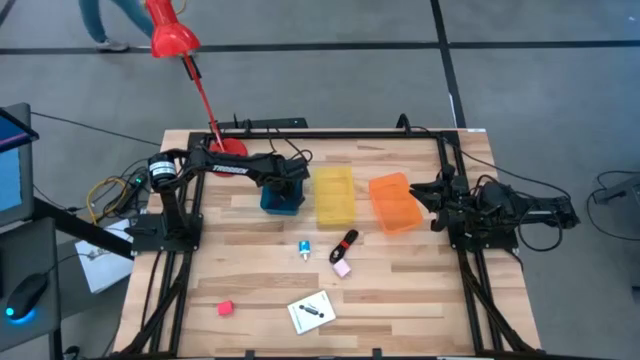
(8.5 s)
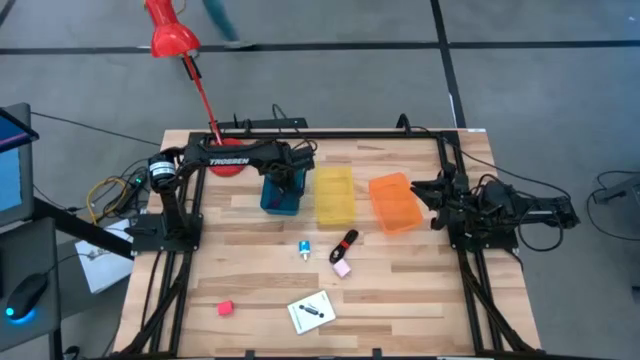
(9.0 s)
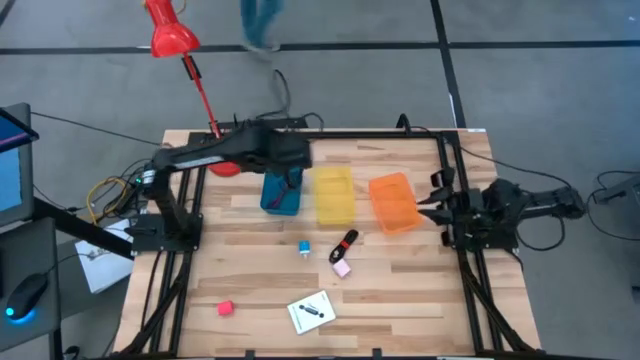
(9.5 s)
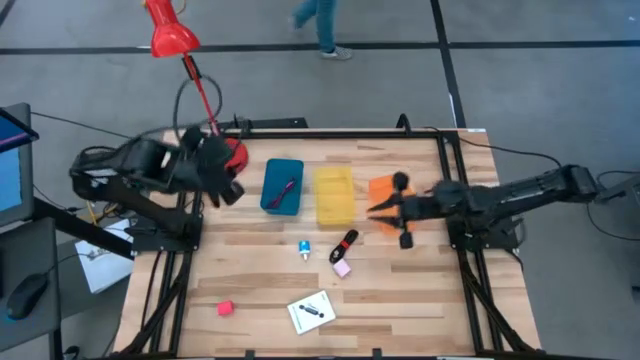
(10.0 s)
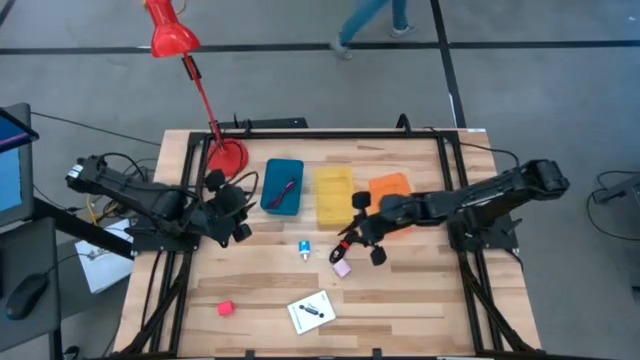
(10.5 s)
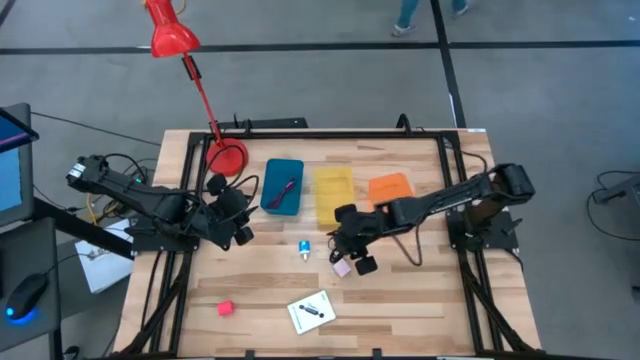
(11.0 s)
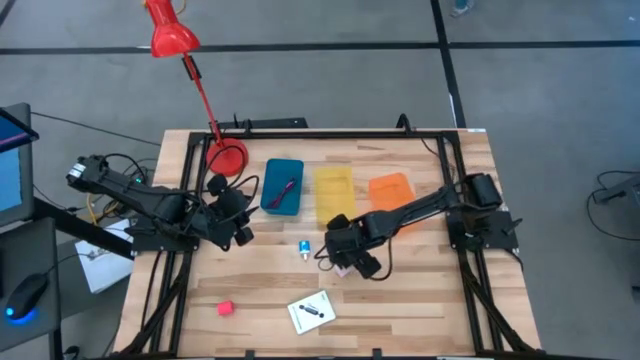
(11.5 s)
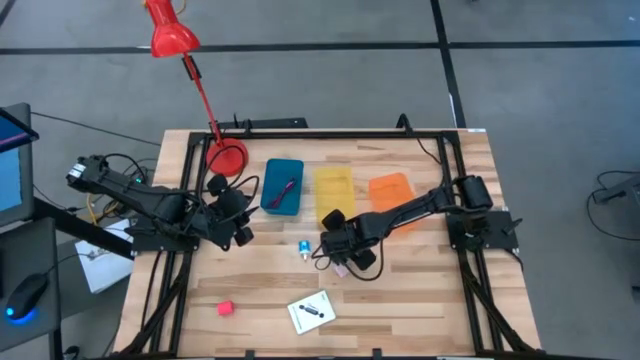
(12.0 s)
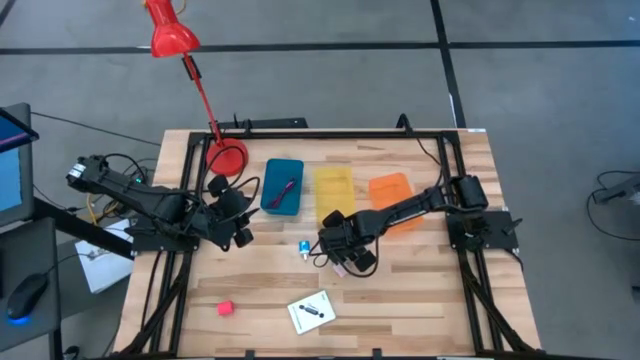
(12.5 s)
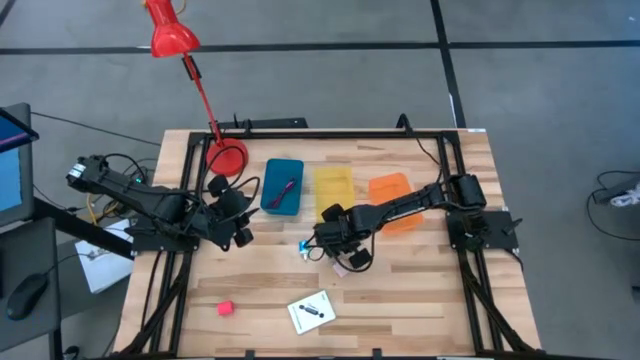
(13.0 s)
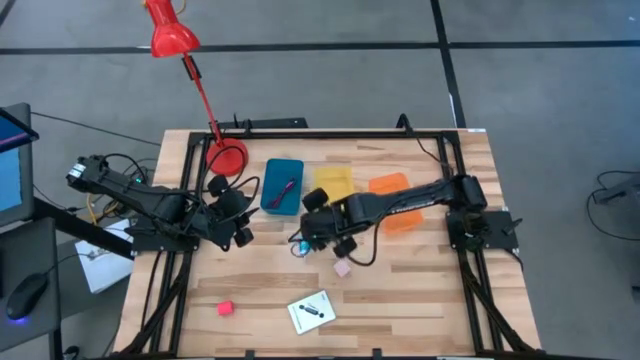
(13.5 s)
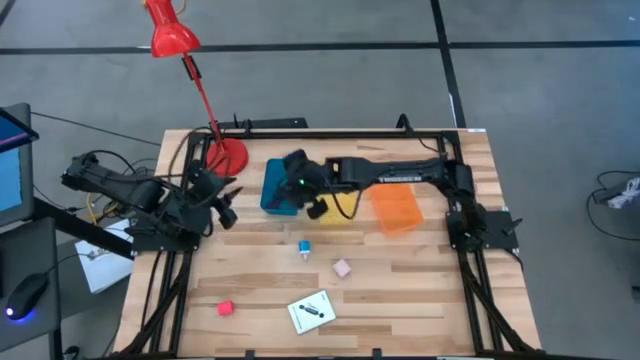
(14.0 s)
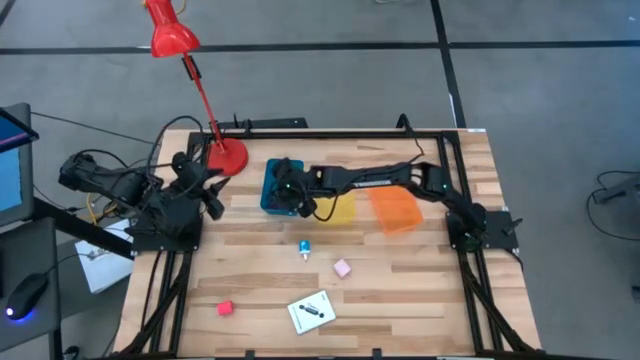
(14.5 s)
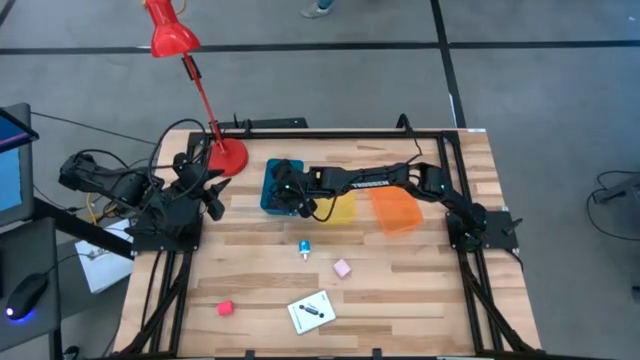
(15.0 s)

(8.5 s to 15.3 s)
Task: Pick and place items into bin
Put the black charger cable into the blue bin

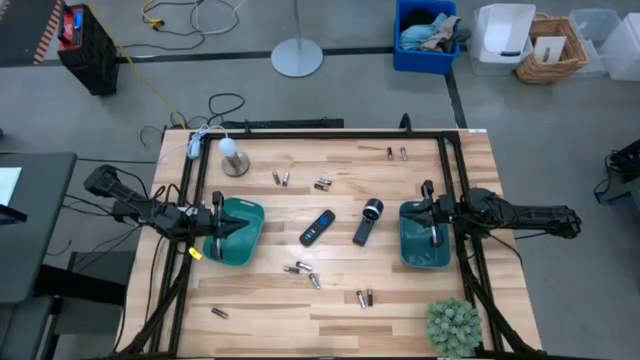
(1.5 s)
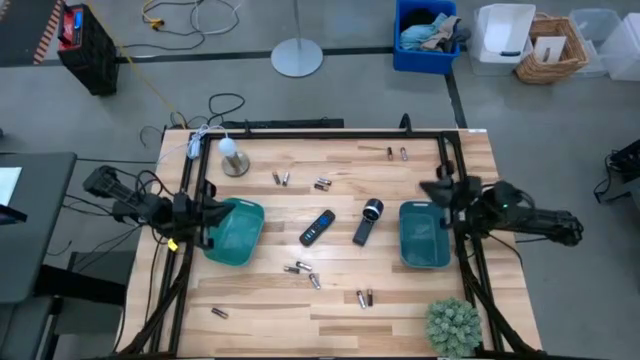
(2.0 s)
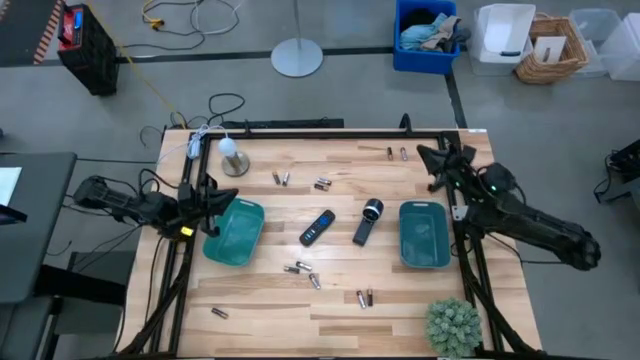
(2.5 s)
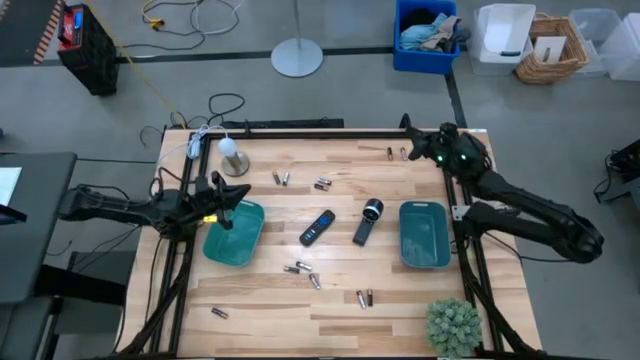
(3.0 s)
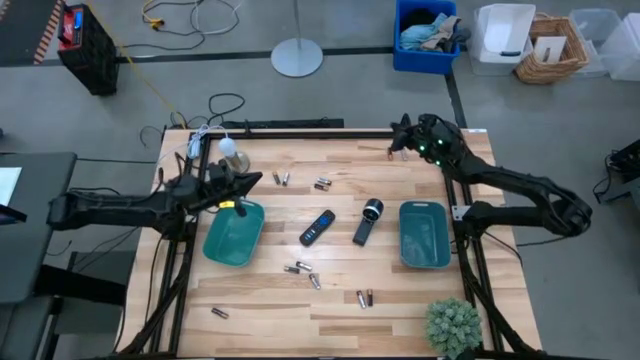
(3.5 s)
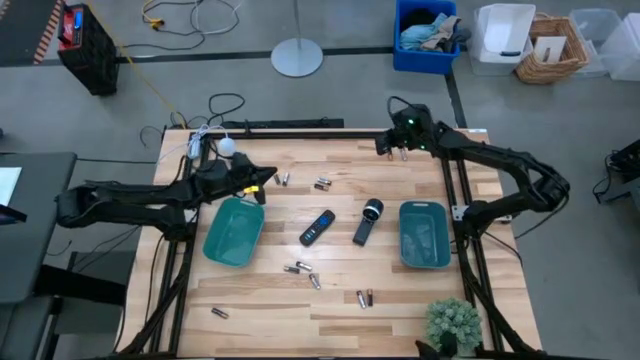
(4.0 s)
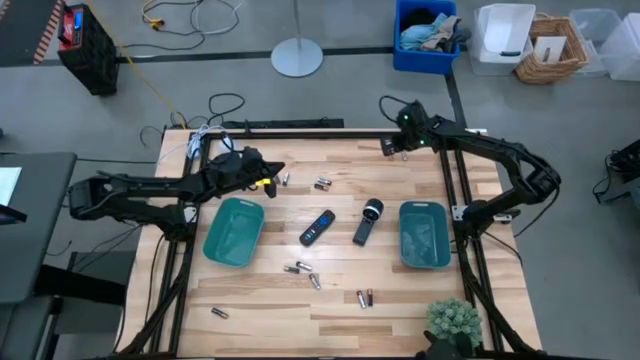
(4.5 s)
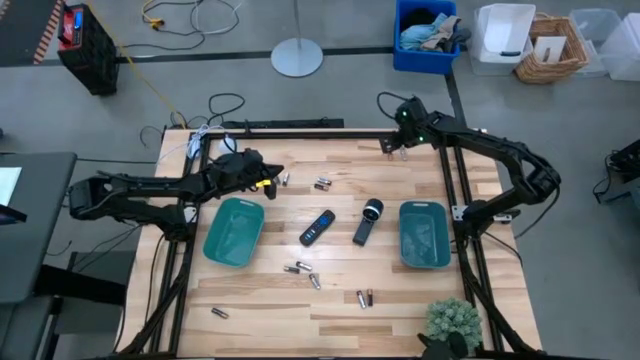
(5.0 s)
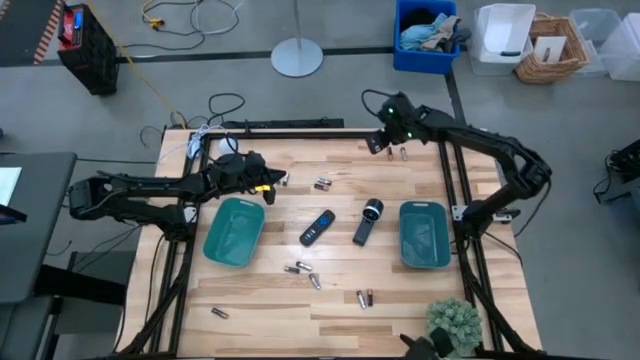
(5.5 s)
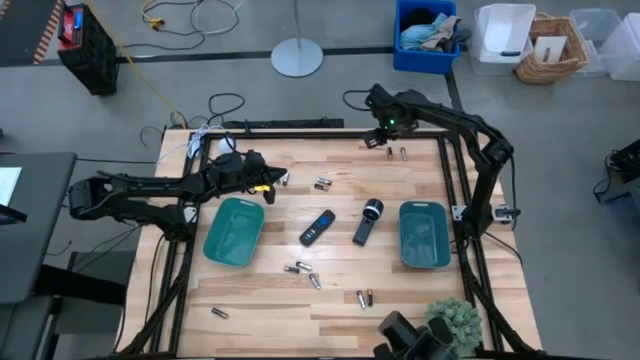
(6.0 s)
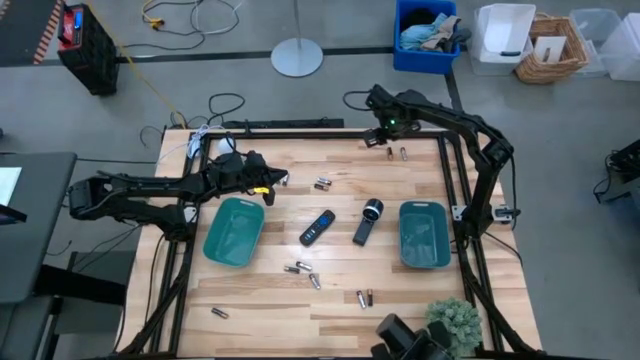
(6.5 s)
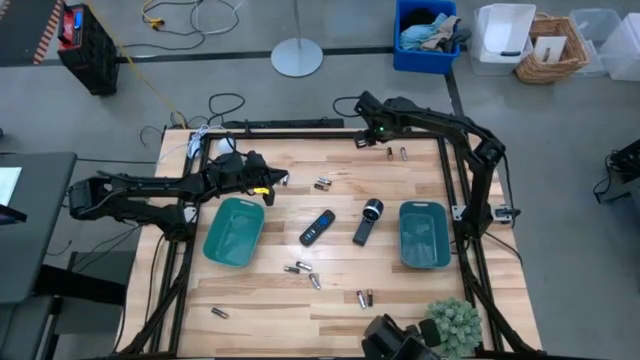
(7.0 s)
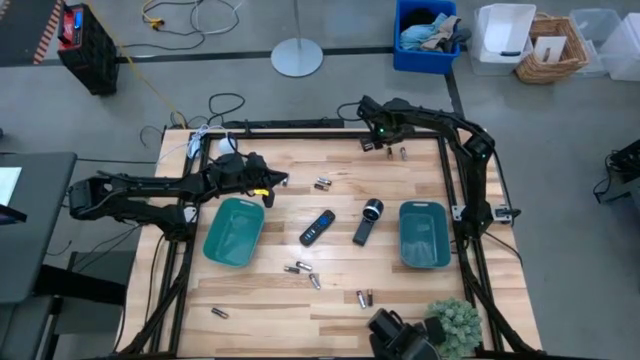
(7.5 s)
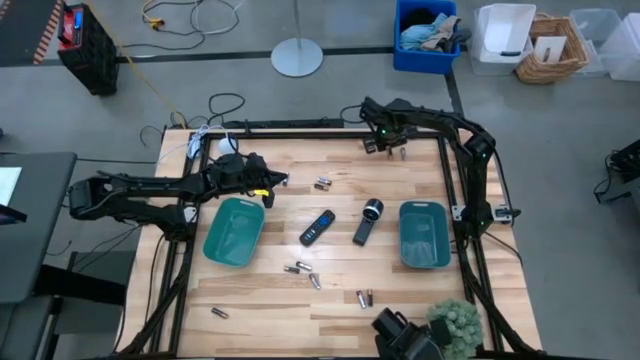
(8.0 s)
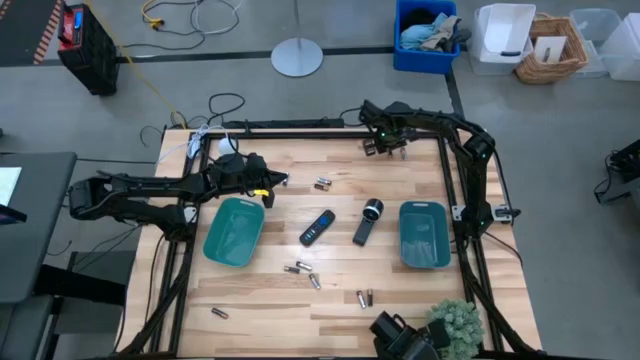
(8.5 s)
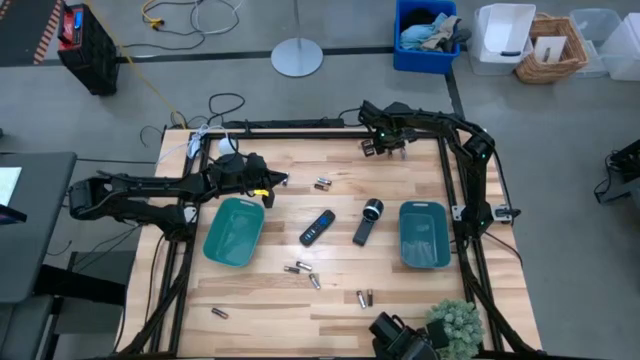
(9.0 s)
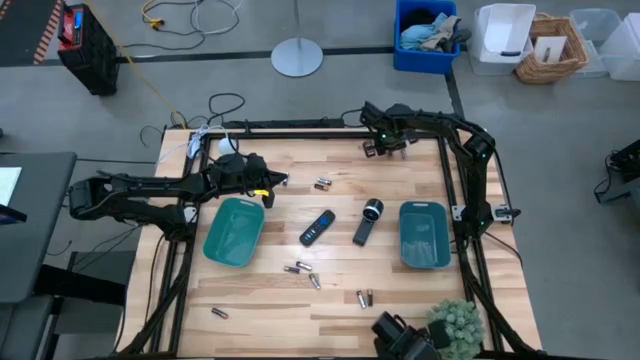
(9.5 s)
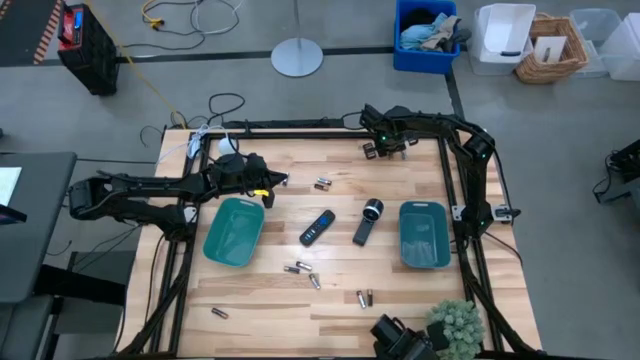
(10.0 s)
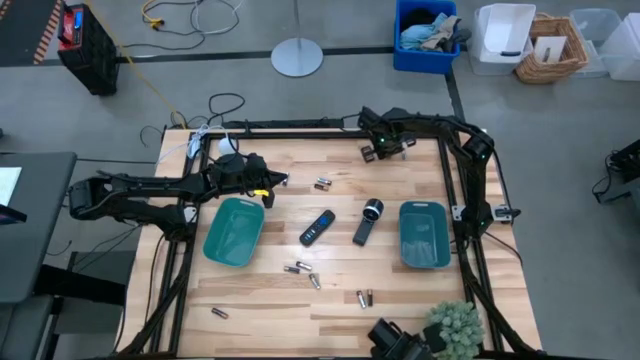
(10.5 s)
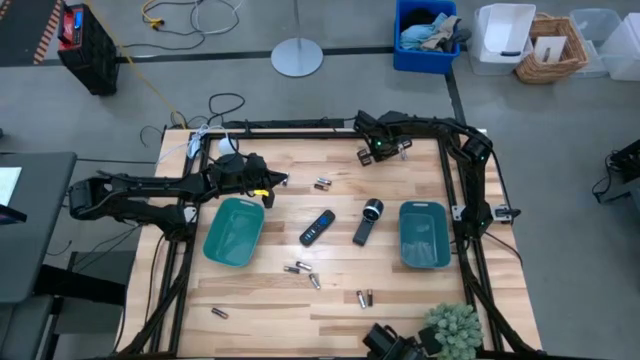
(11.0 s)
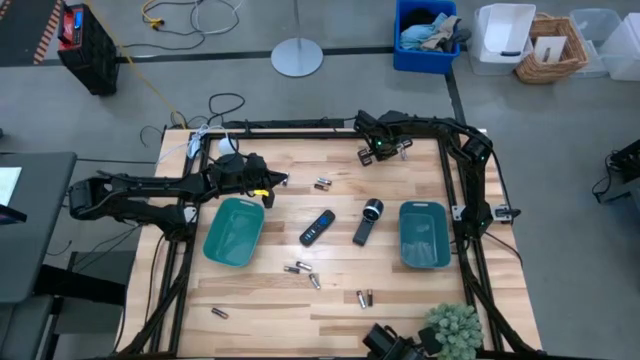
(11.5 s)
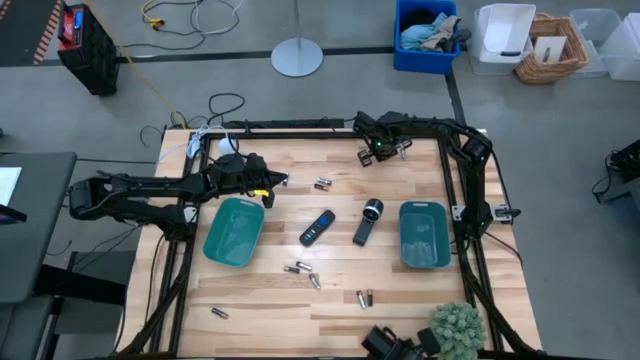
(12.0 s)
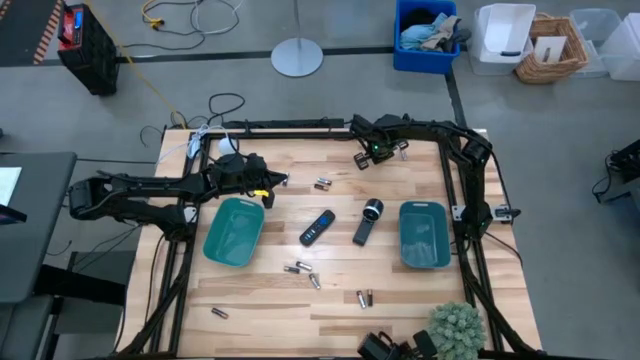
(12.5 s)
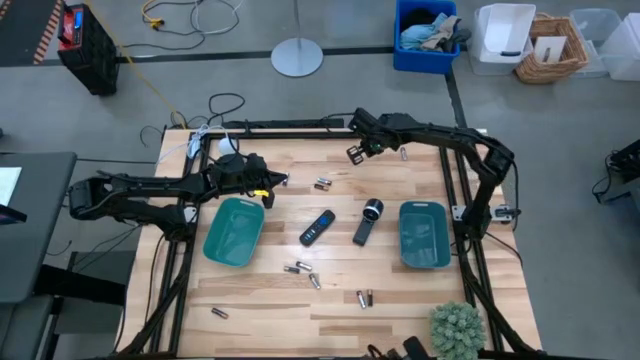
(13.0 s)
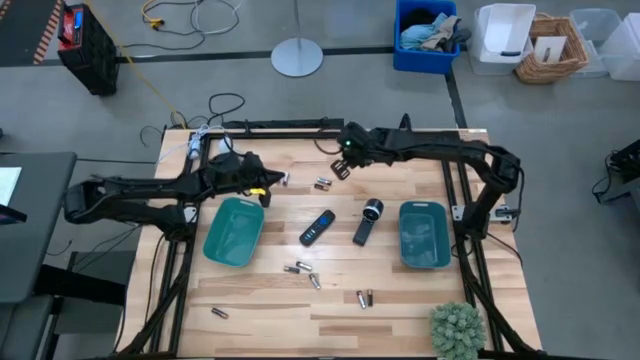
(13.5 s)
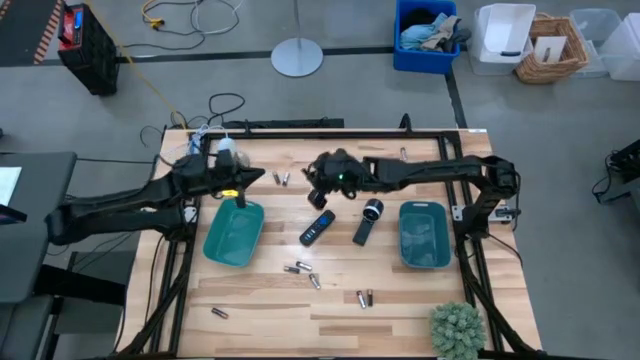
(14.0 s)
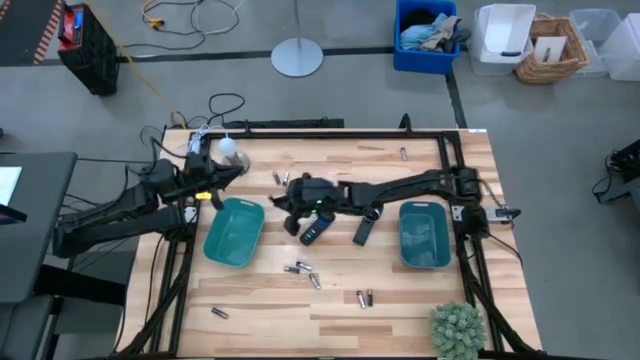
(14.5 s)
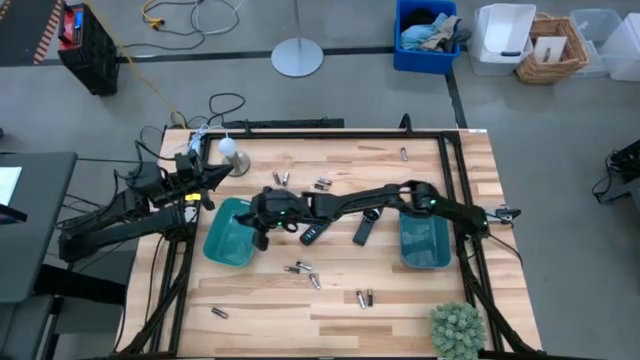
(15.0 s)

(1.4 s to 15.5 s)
Task: Sort batteries
Put the brown battery into the green bin
